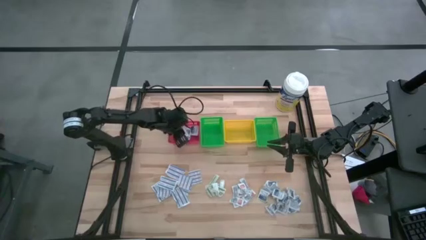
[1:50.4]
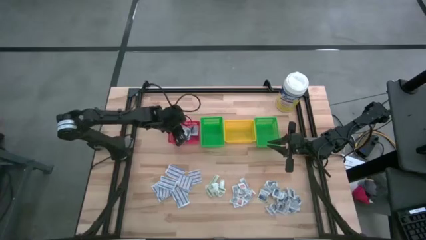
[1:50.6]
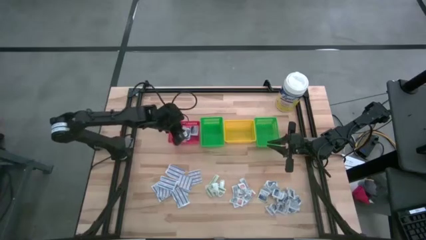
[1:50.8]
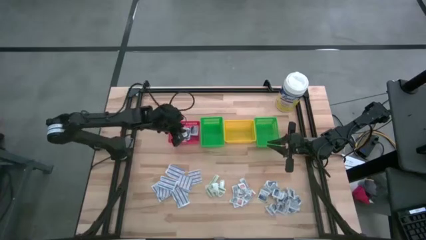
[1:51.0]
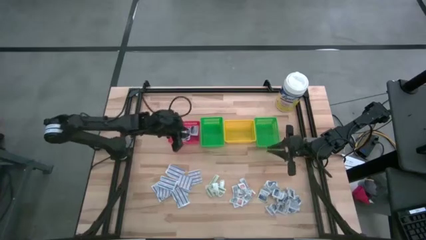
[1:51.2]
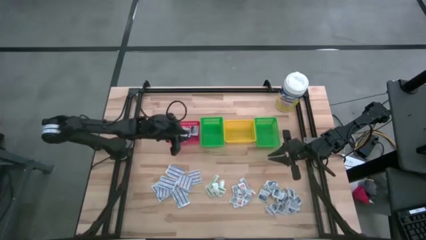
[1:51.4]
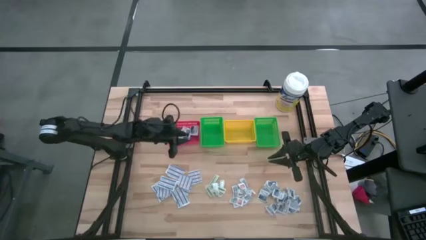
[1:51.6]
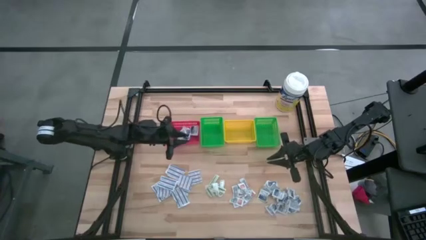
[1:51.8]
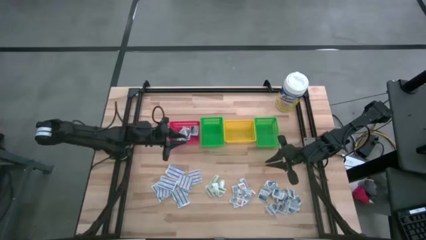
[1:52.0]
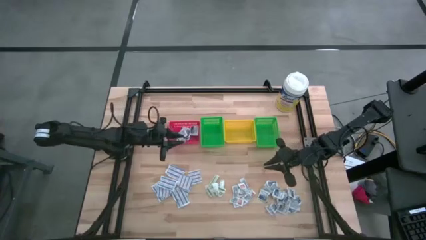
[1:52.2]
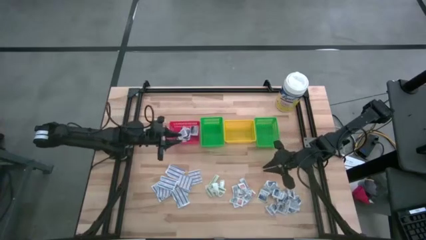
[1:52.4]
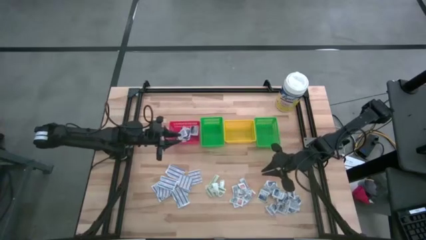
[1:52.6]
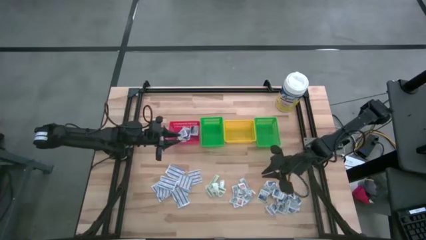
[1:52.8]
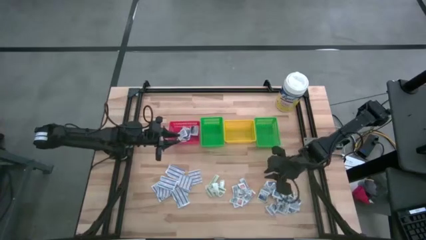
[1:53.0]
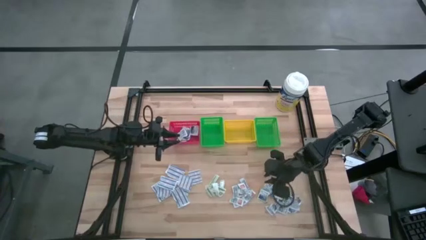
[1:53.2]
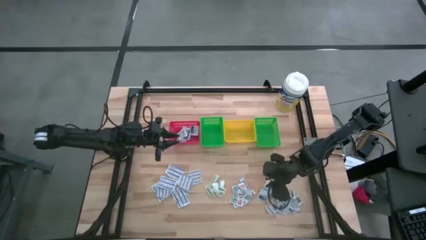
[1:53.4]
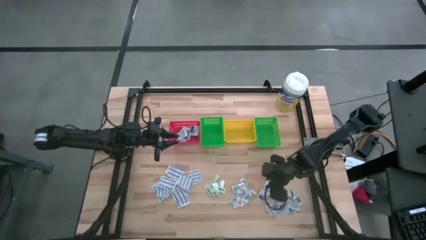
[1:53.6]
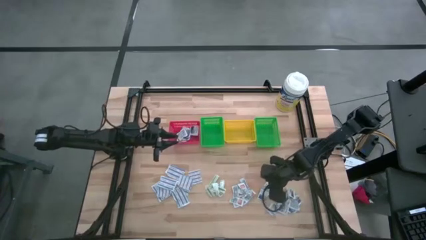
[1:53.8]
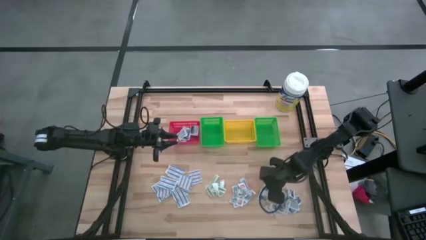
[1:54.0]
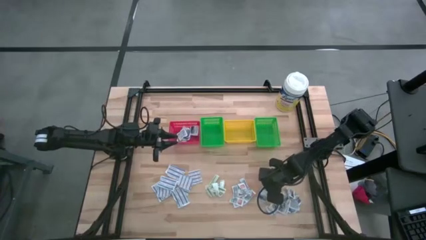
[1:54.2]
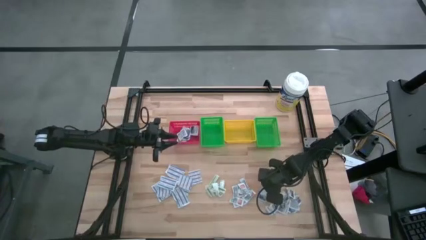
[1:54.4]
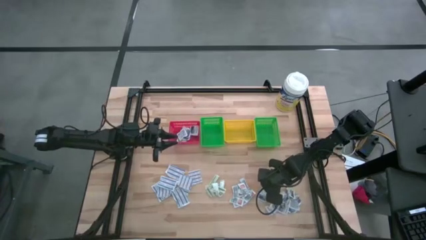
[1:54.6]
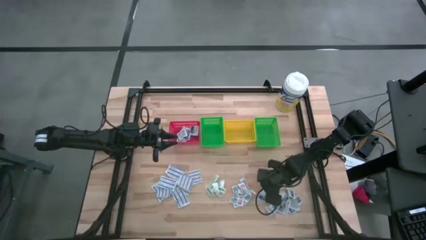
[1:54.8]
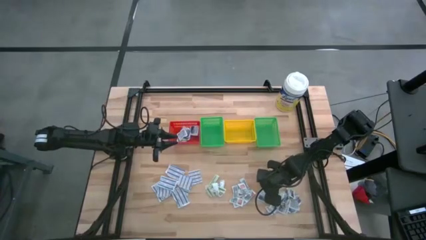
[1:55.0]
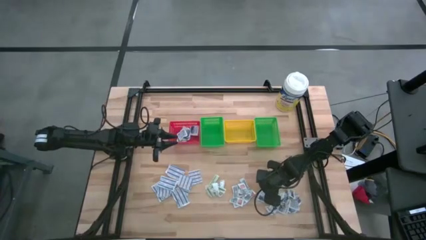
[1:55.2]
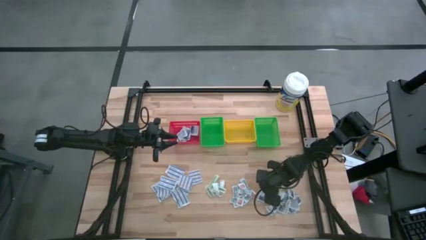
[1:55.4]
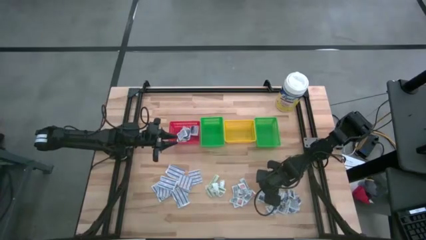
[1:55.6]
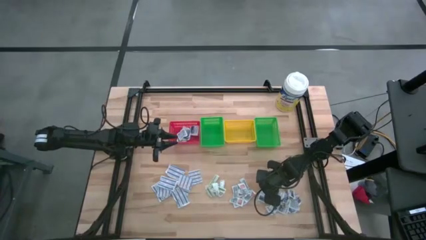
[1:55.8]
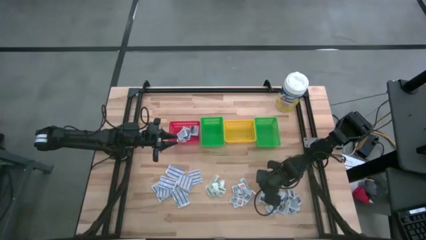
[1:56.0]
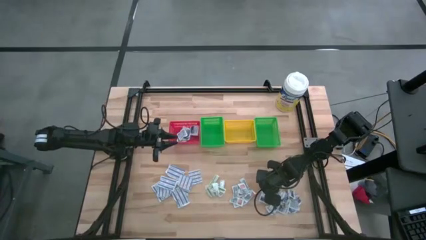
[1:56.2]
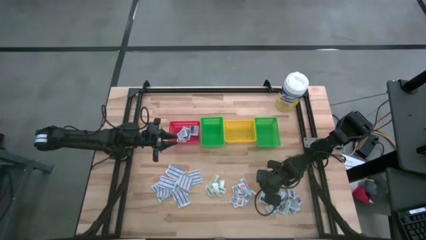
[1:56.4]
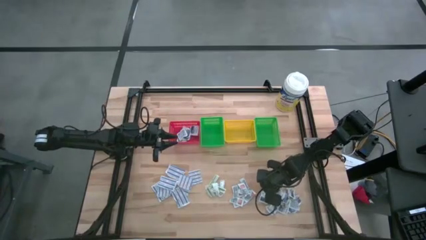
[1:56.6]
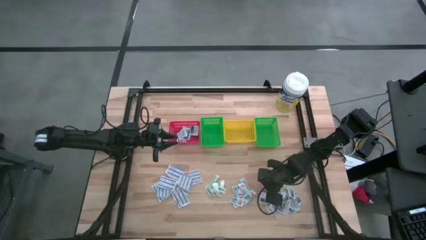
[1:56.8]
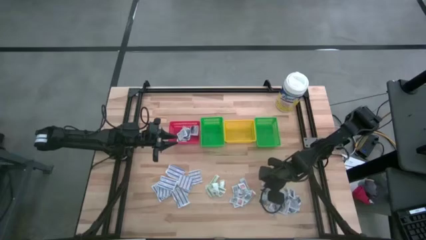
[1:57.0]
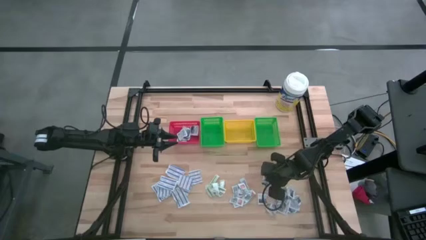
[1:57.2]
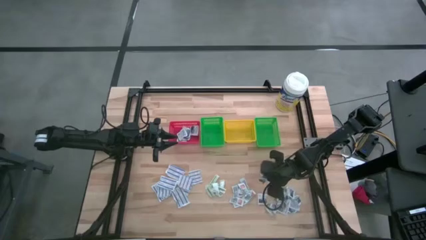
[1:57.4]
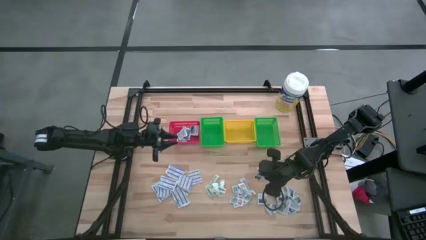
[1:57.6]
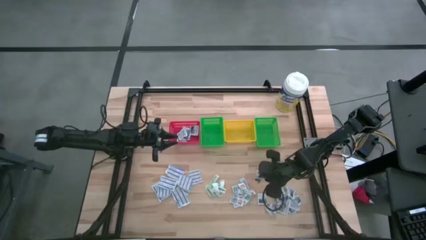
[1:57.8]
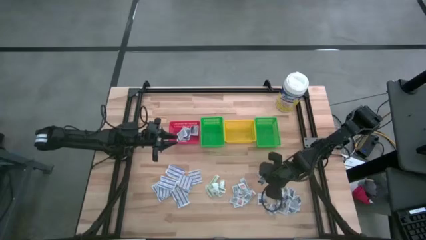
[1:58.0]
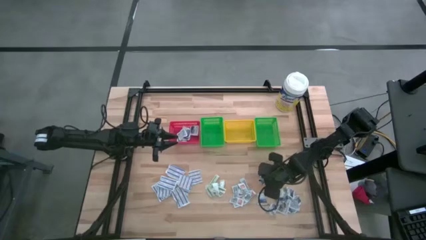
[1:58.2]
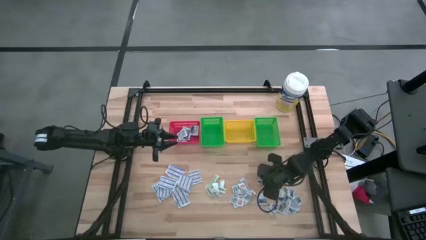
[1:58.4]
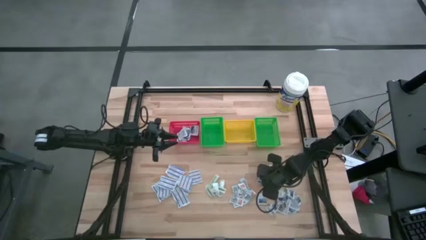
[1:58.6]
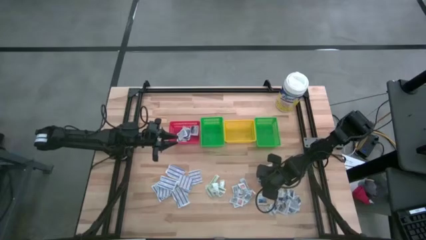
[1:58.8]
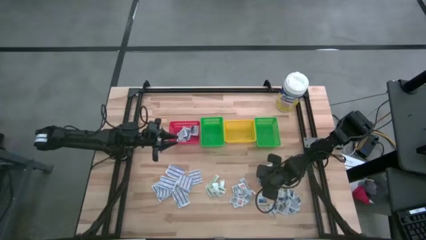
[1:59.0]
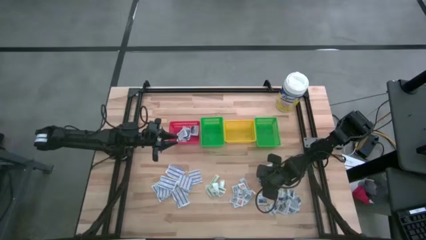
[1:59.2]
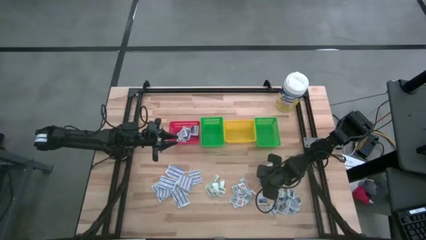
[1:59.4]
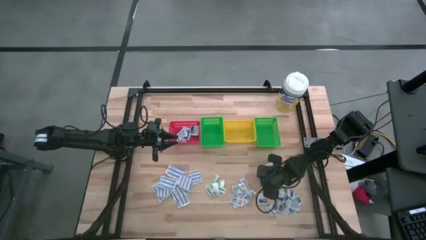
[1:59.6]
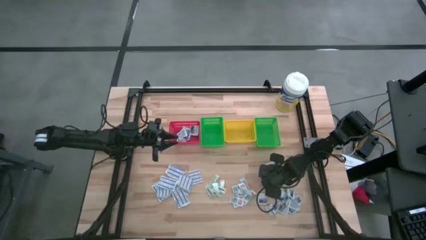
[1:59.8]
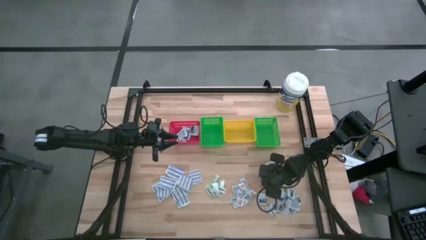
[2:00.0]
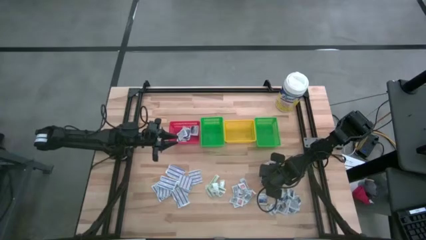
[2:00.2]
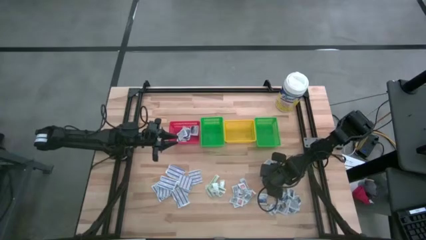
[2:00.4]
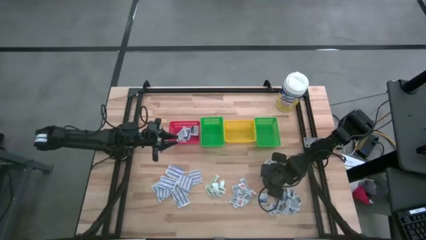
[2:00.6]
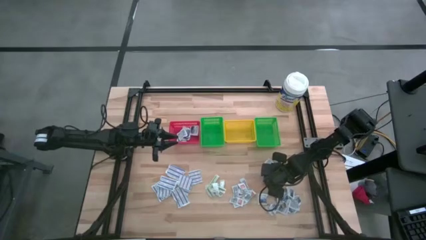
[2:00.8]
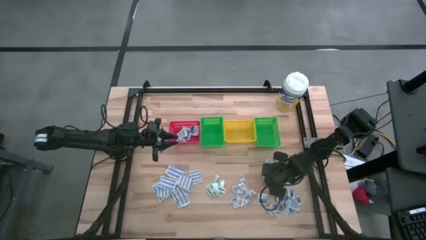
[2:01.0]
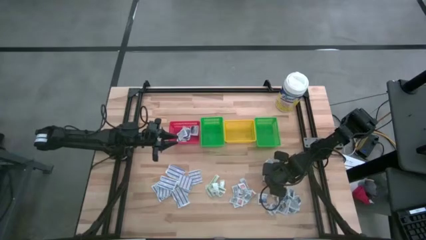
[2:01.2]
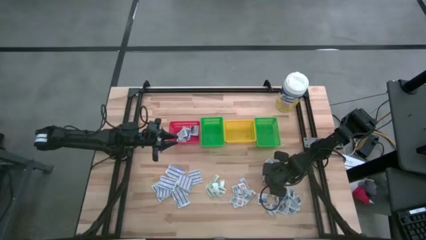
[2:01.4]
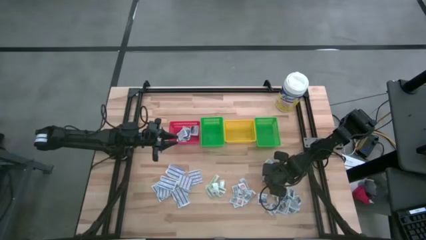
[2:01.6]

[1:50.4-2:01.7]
Task: Pick & Place First Aid Supplies
Put the alcohol pad into the red basket
